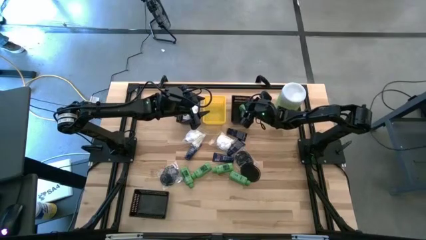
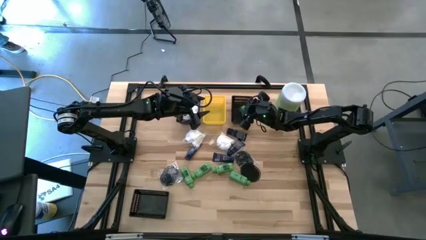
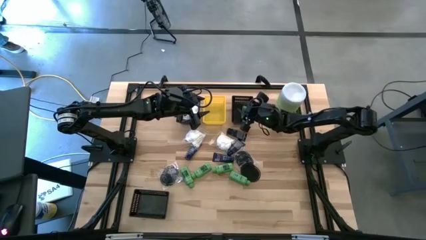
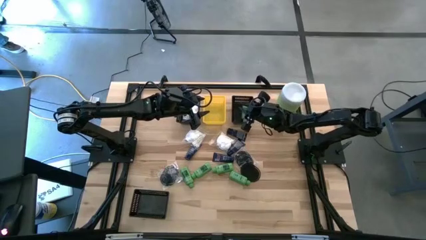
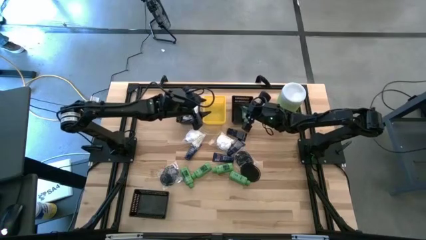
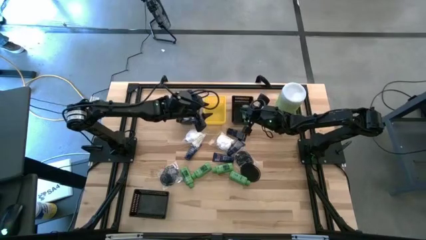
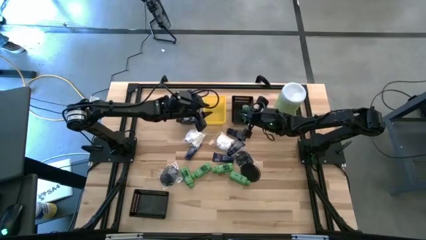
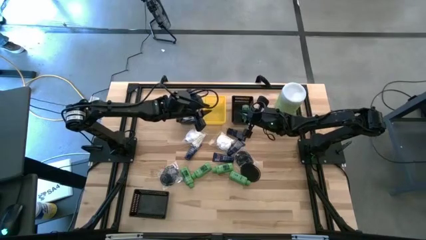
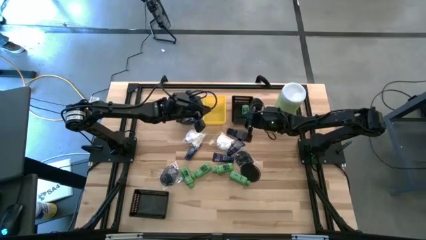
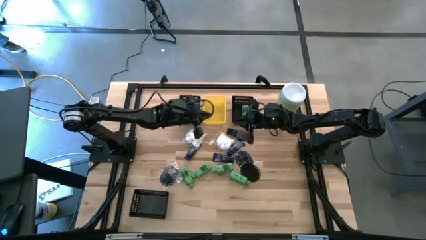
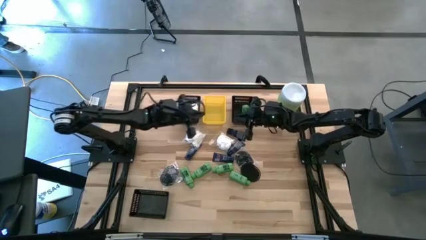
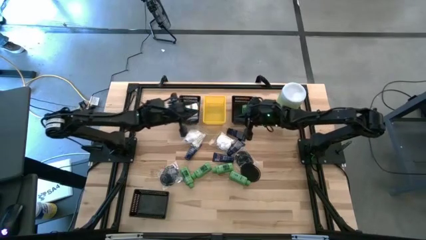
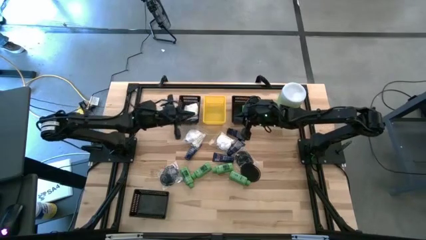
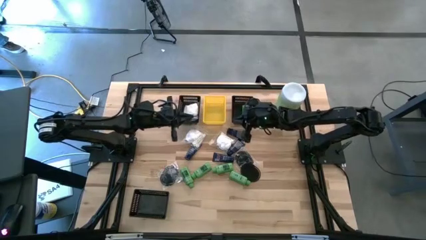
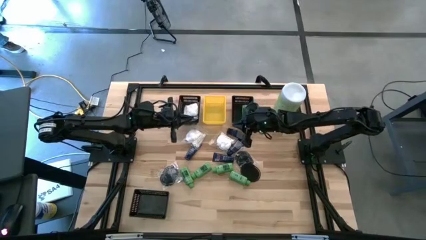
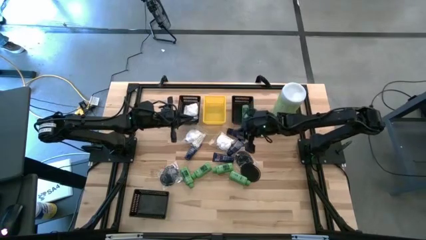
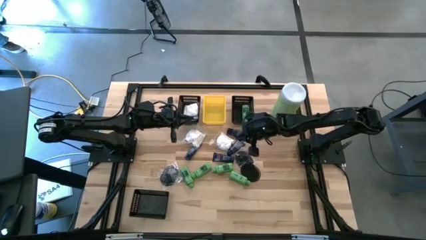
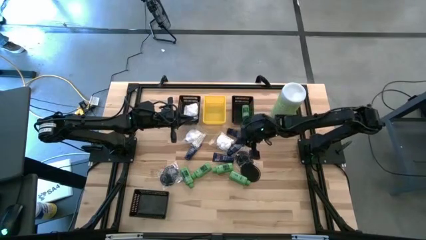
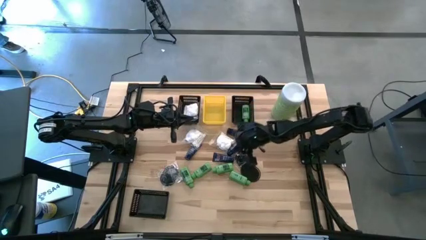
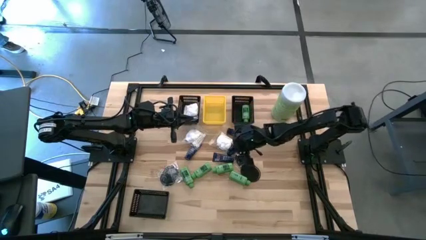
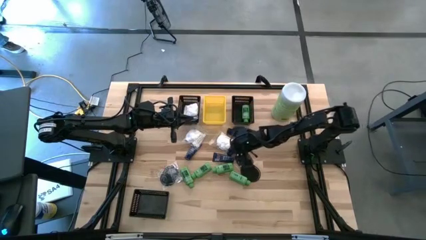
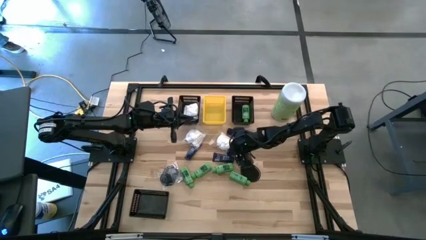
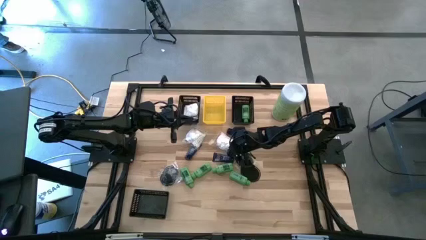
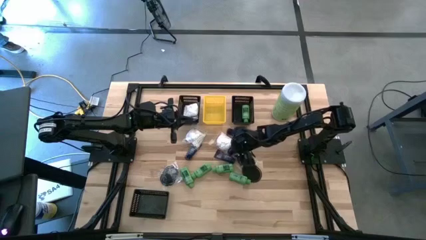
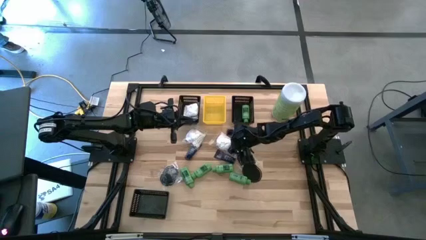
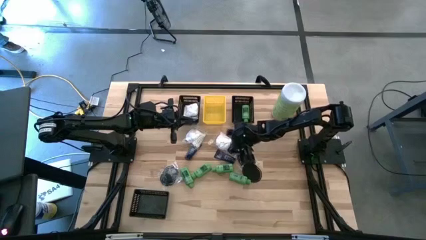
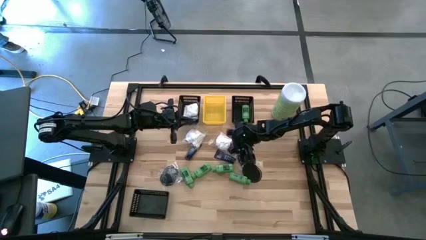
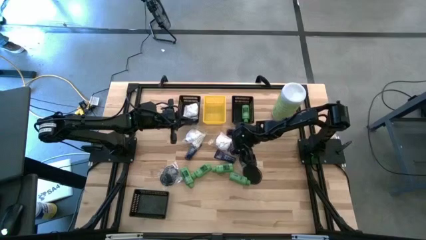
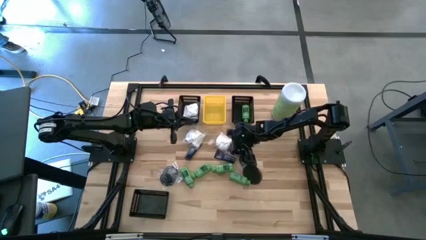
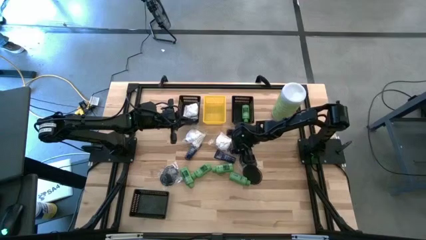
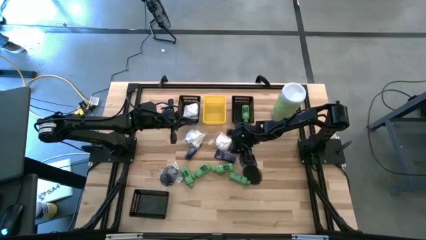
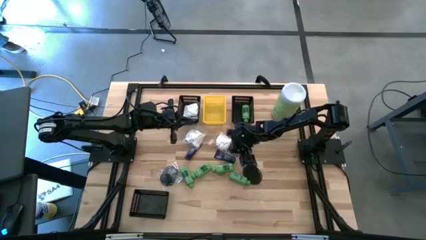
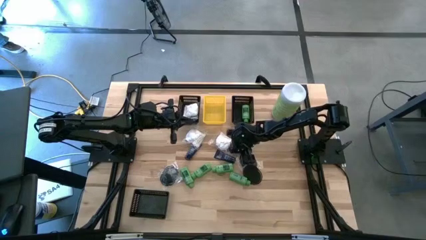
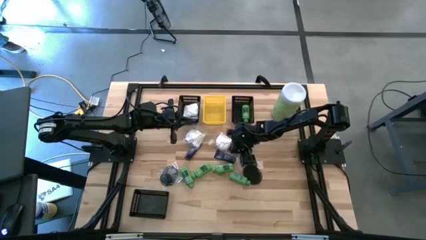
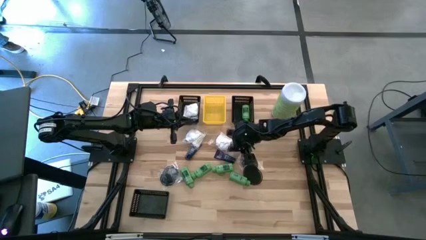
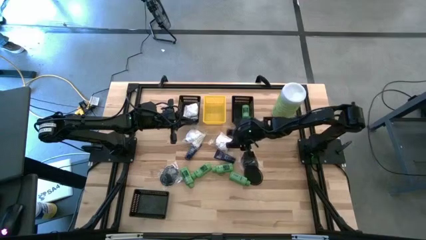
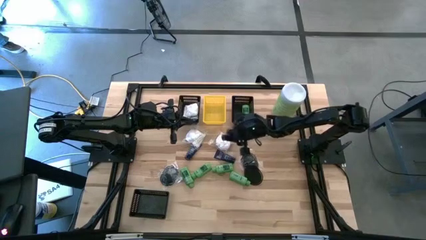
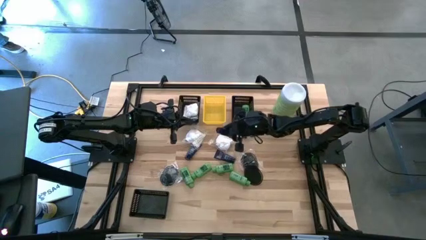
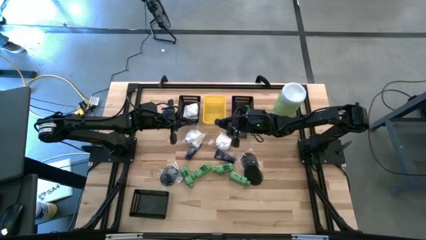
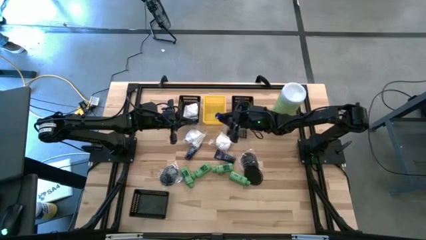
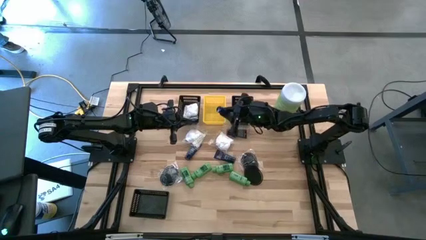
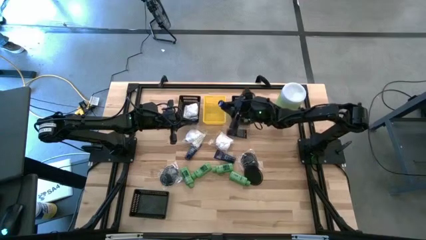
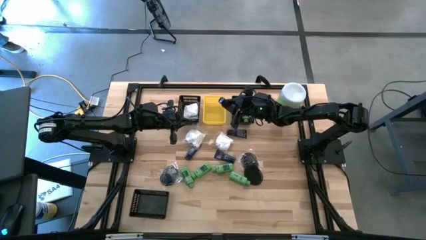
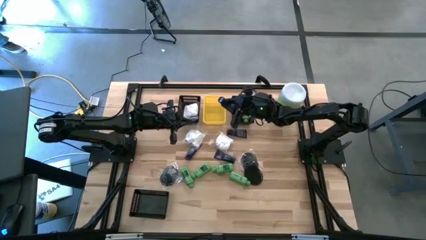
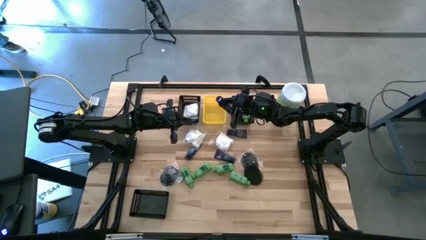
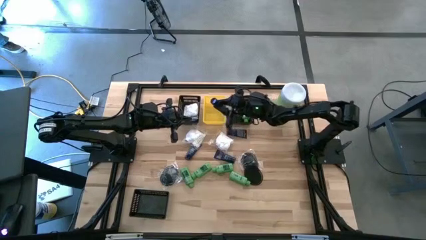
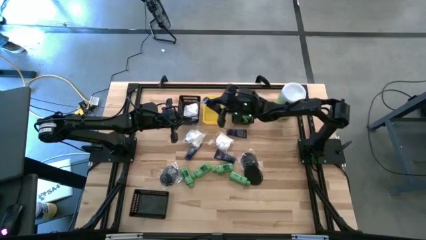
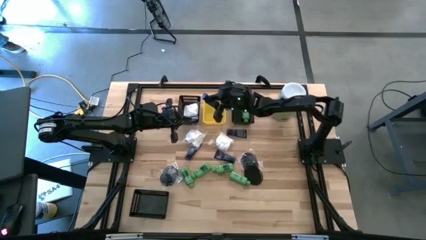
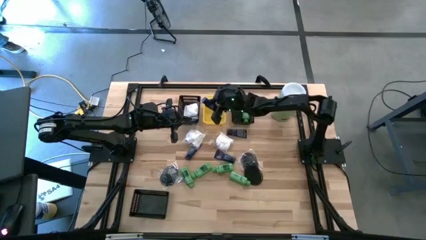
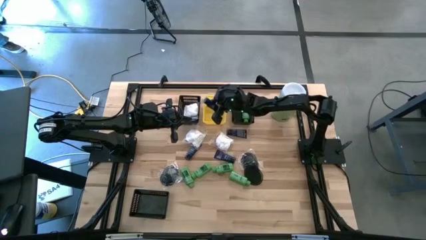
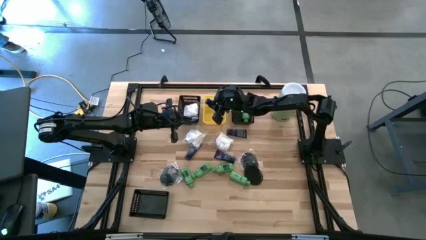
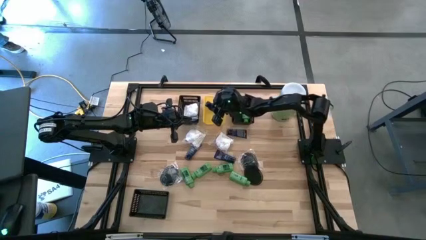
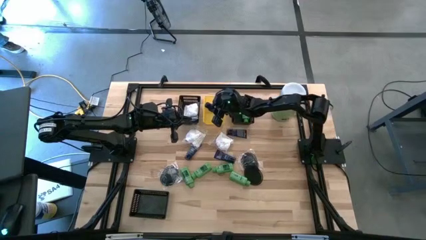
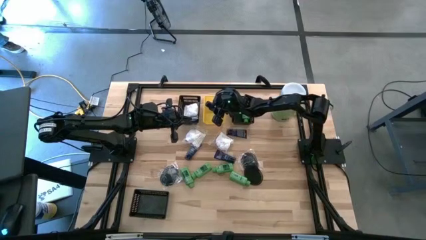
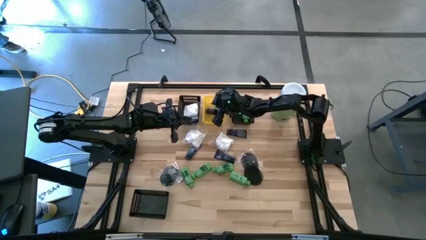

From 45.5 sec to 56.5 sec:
Task: Pick & Place Travel size toiletries
Put the blue shave cream bottle into the yellow bin
